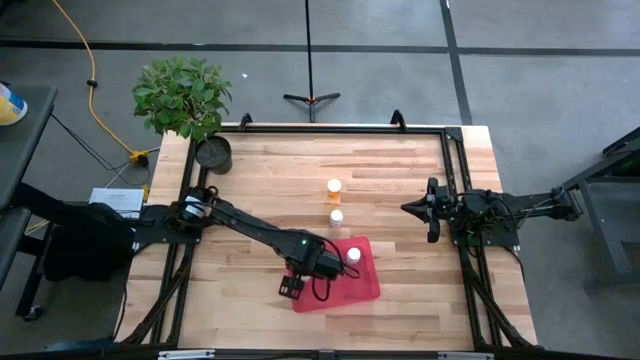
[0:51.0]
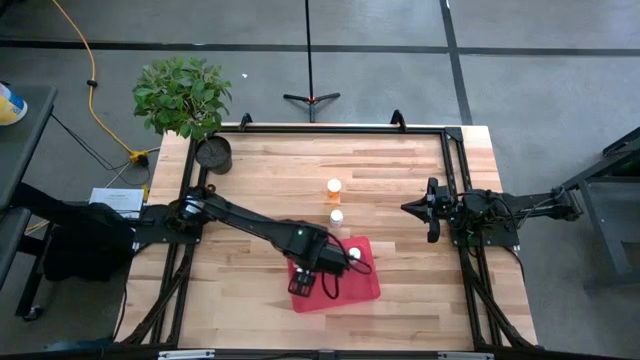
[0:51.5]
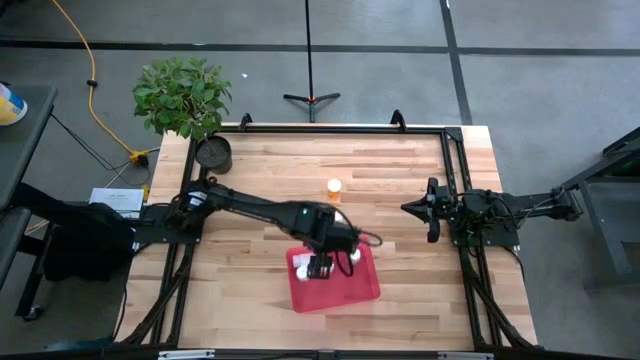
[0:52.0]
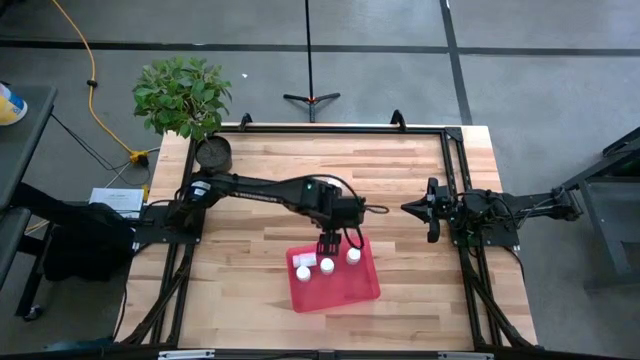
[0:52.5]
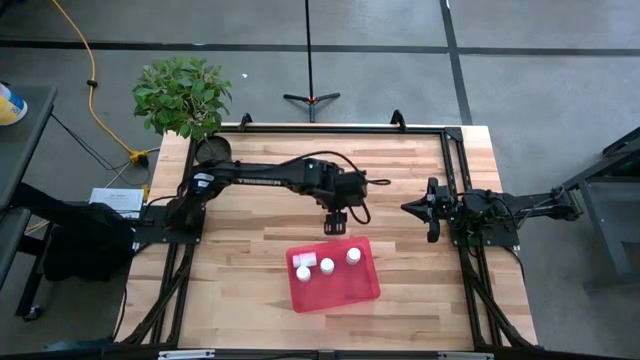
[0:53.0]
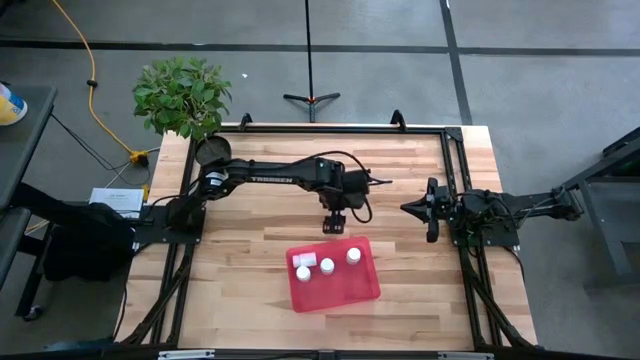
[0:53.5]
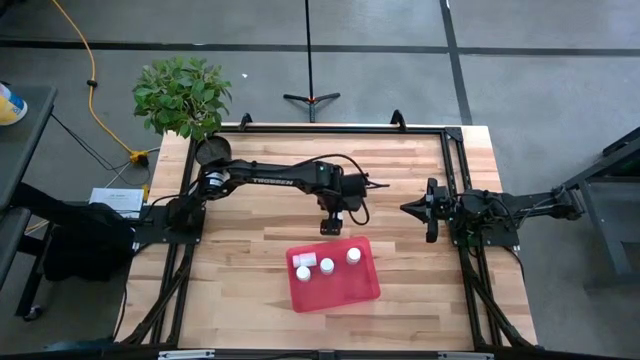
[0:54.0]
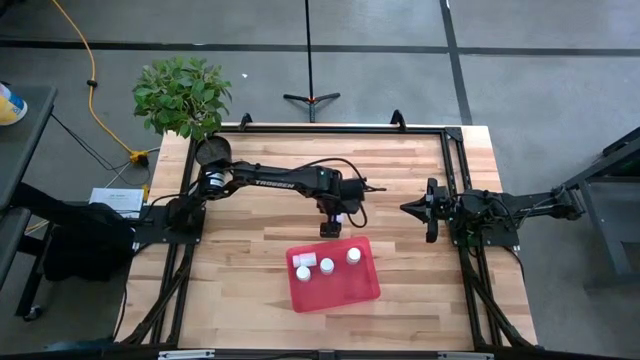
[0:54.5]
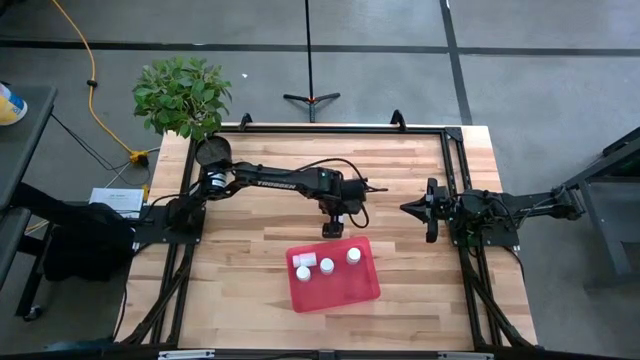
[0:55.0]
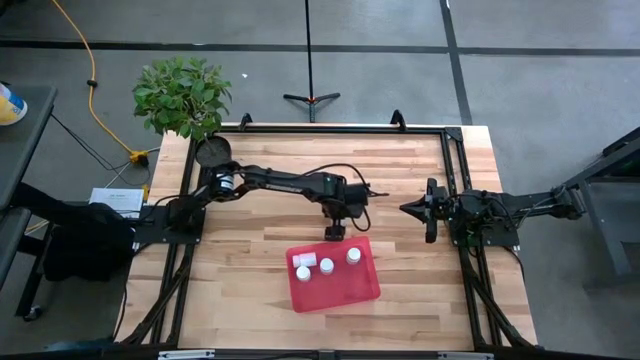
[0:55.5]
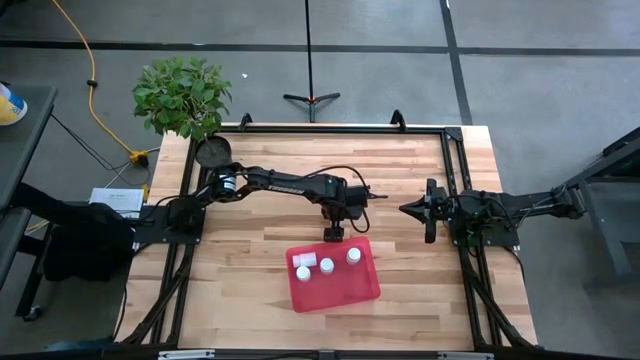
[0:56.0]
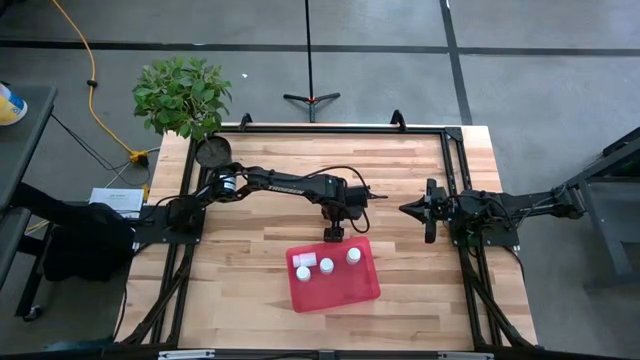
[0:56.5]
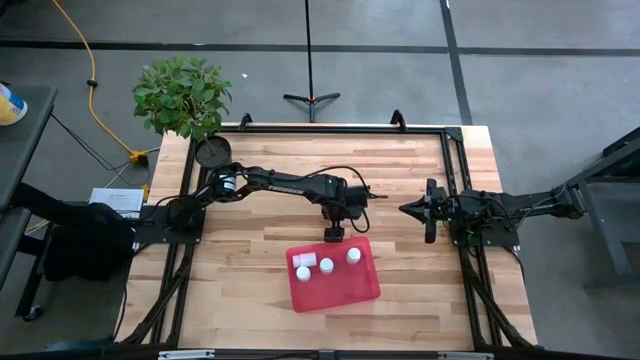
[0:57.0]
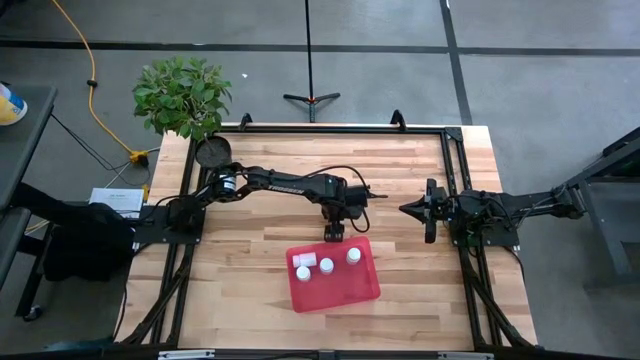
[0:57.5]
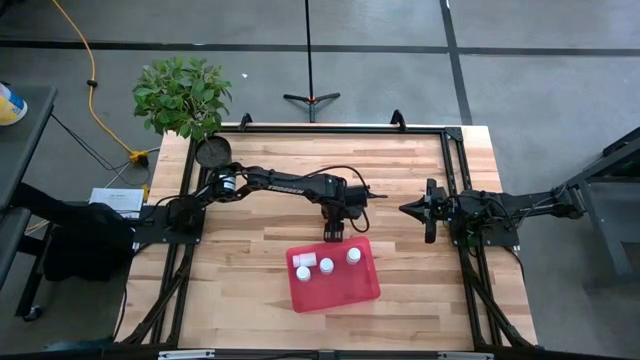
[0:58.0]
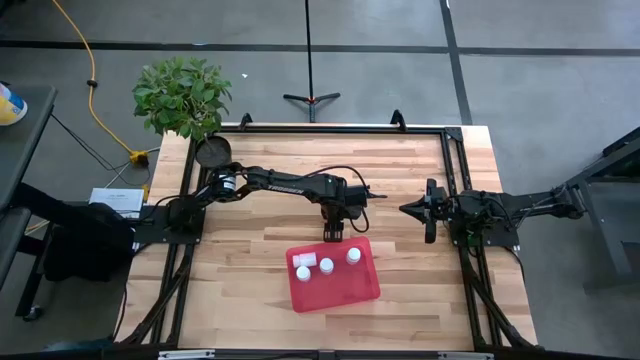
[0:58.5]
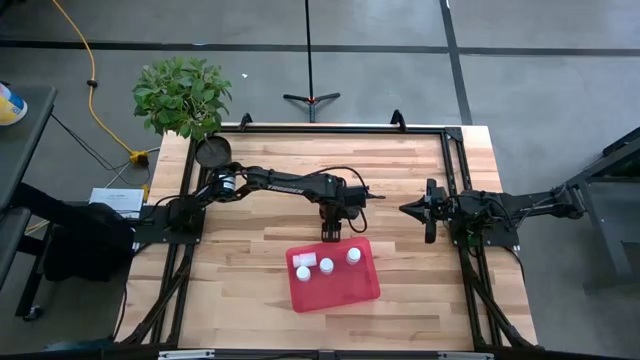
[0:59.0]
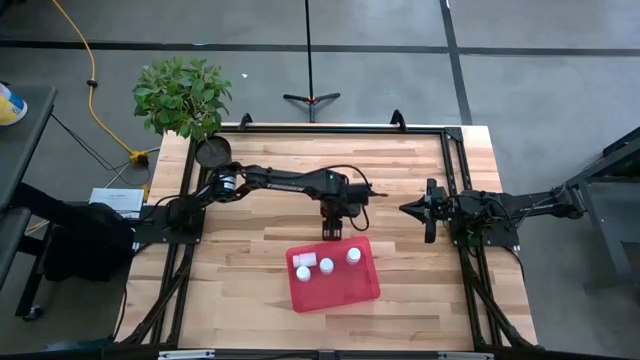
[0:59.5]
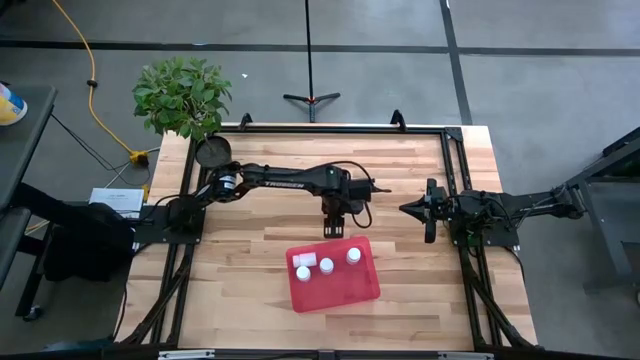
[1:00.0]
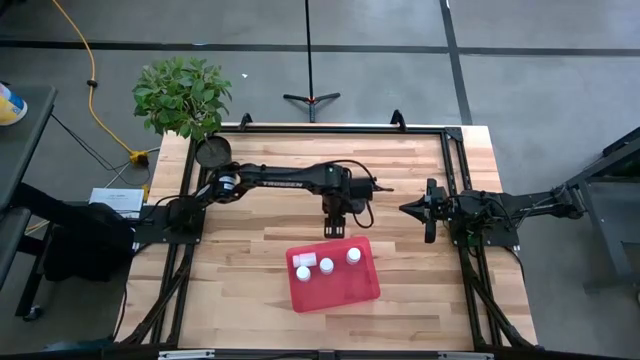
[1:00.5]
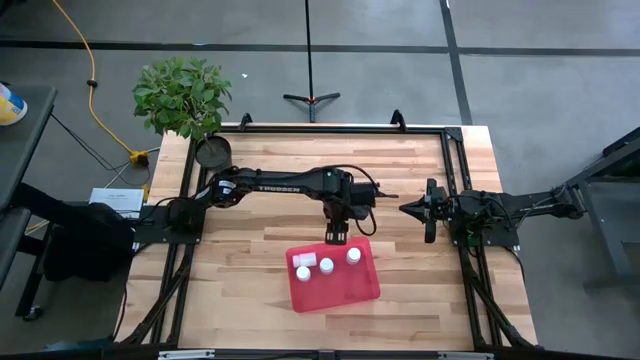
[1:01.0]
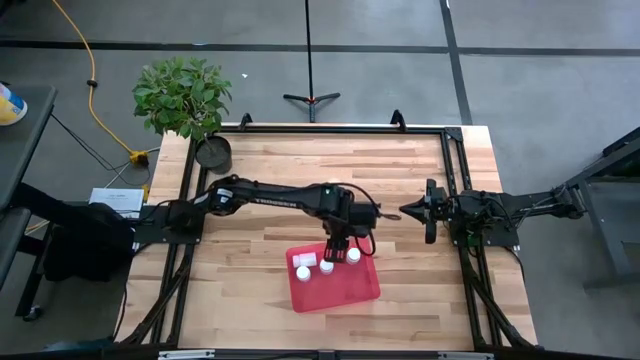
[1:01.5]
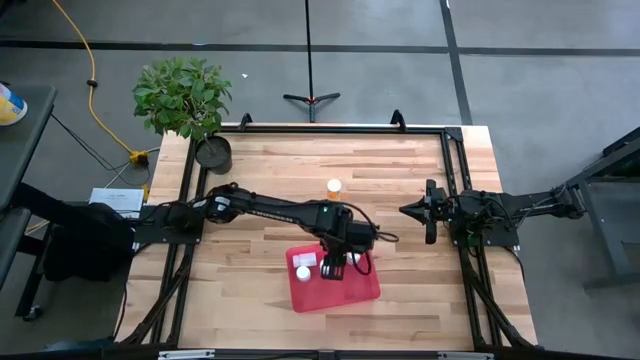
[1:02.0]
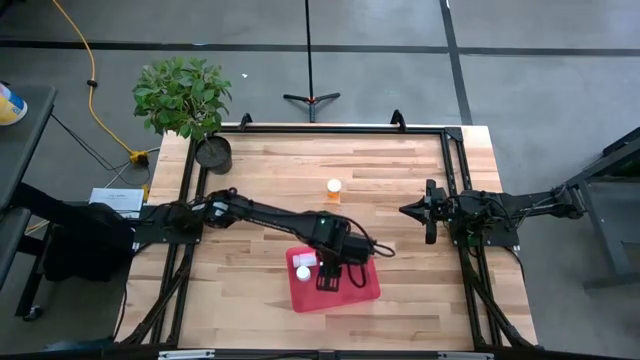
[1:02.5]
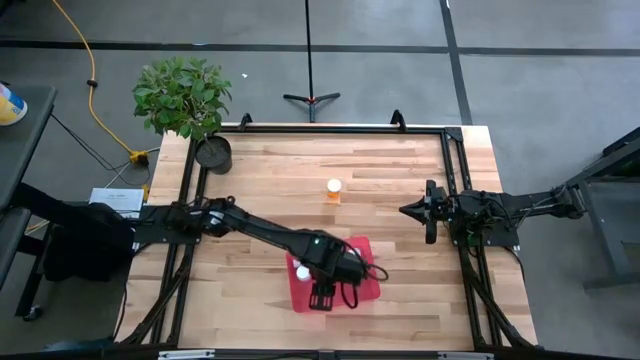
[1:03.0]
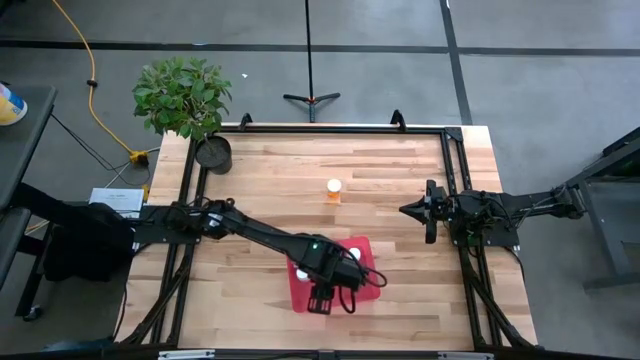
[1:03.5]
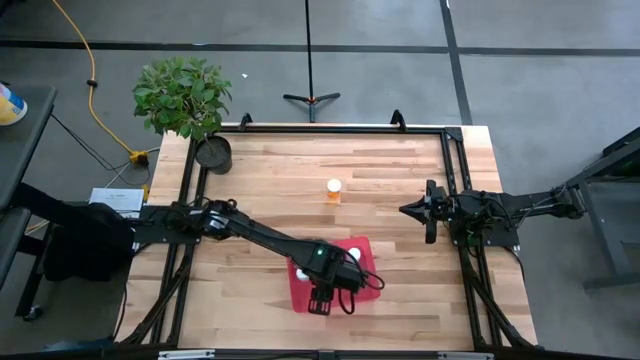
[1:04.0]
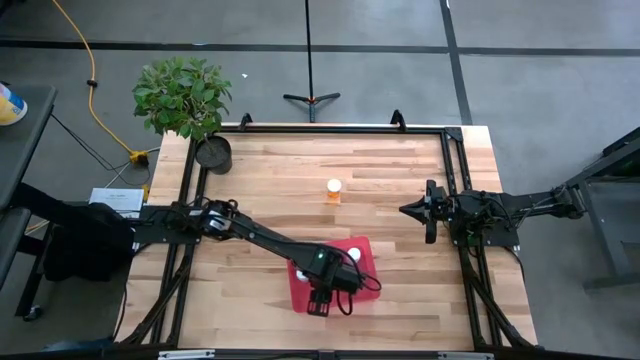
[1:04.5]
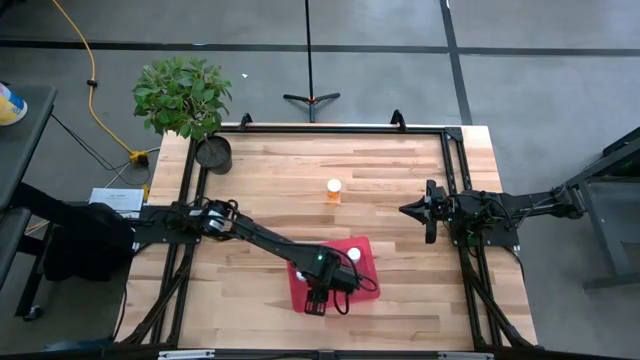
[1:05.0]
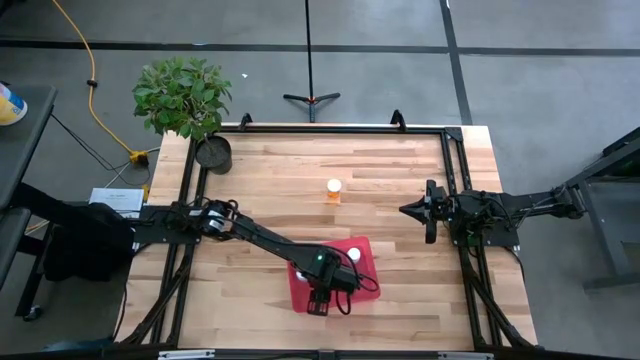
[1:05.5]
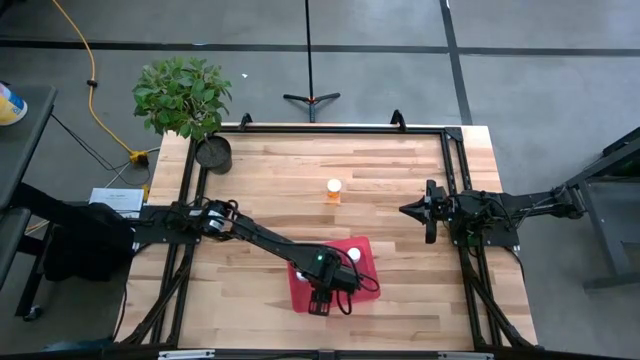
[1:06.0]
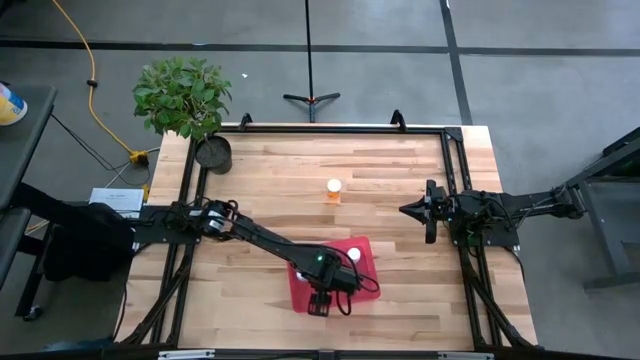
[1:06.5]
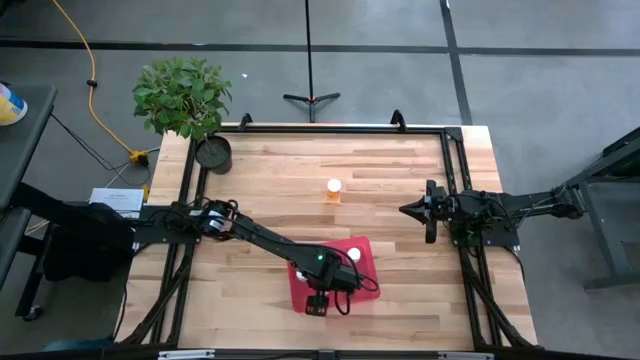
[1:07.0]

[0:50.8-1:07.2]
Task: Pick and place pill bottles into a basket
Put the white pill bottle into the bin

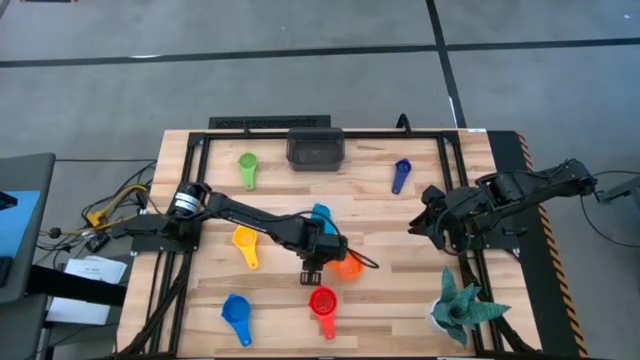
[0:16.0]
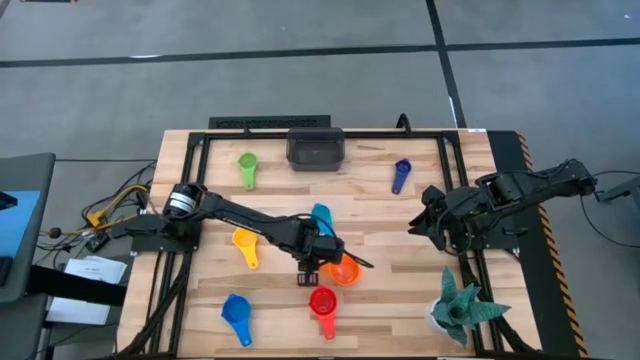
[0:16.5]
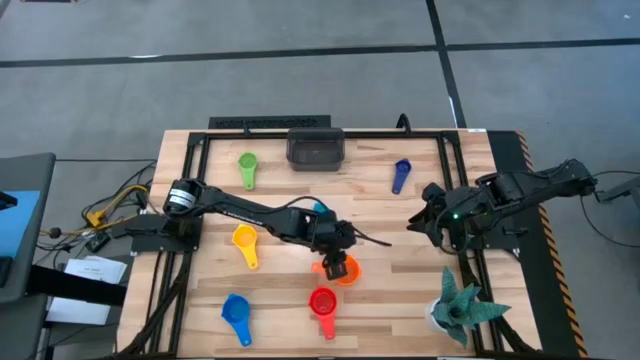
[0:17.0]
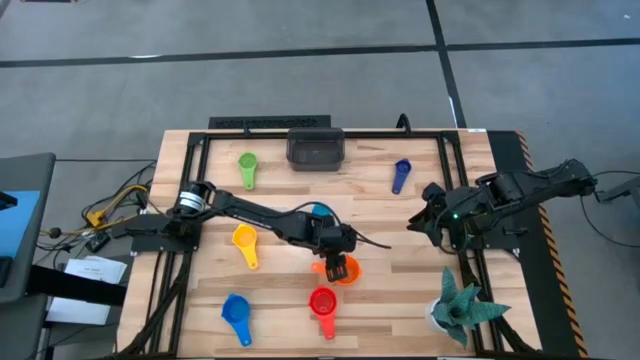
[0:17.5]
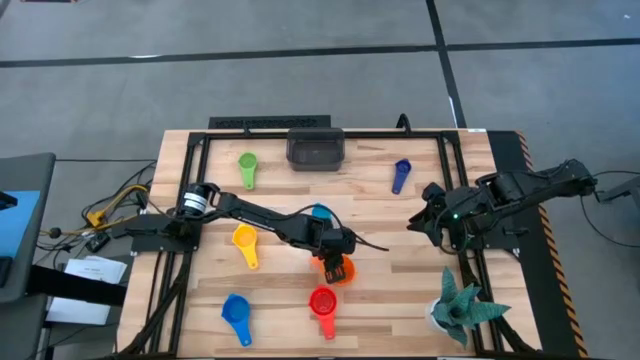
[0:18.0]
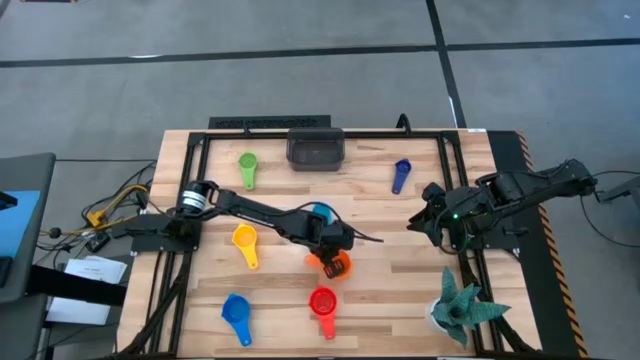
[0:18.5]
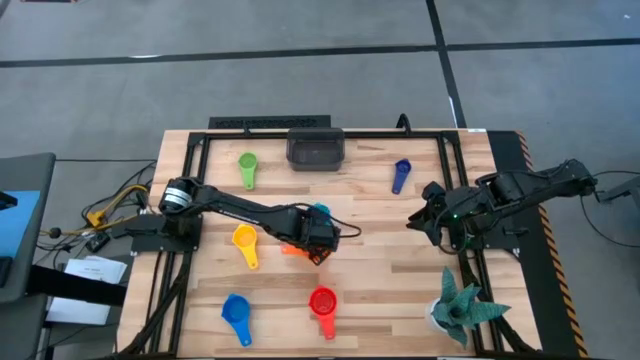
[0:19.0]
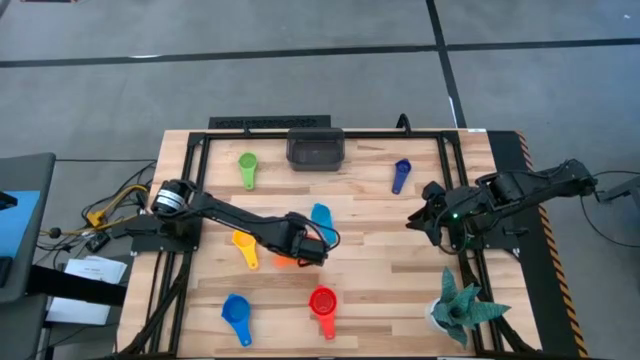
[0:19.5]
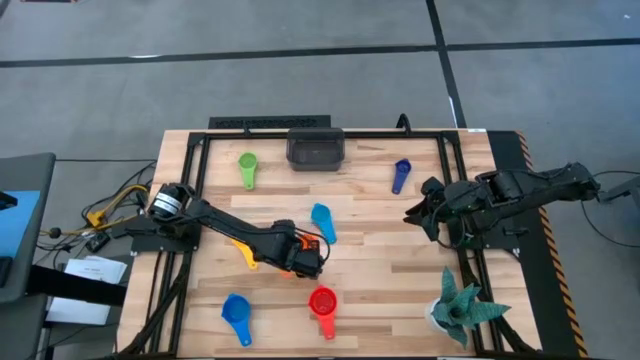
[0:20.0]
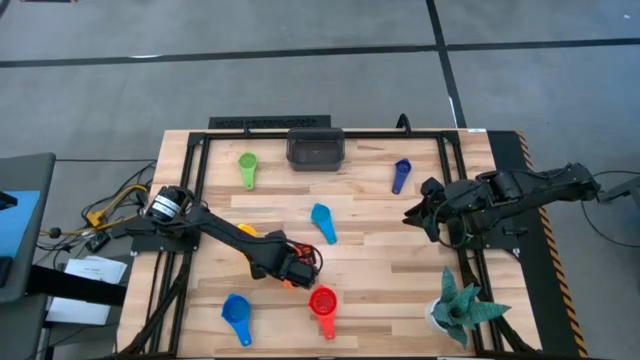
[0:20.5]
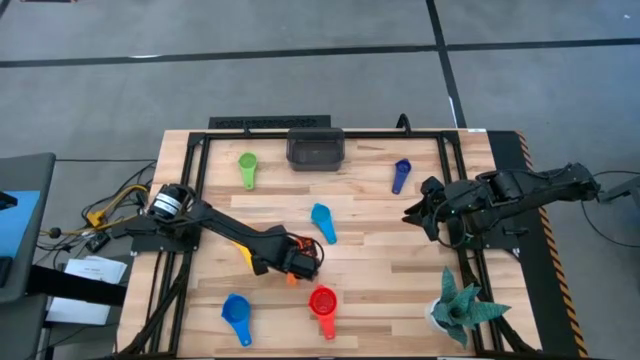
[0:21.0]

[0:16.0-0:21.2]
Task: Nest measuring cups in basket
Move the orange measuring cup to the center of the table
